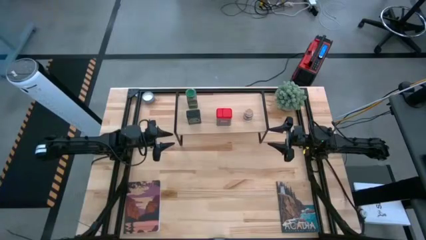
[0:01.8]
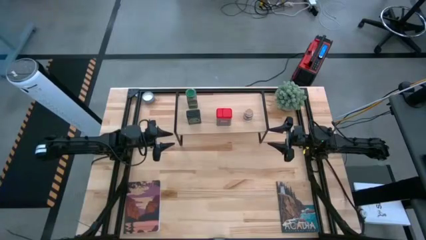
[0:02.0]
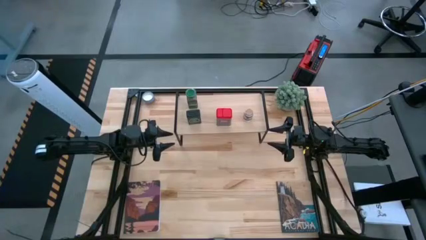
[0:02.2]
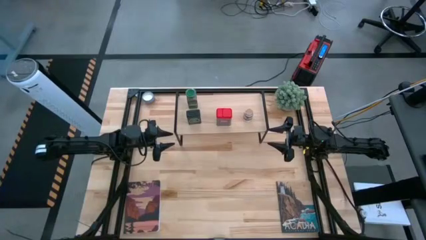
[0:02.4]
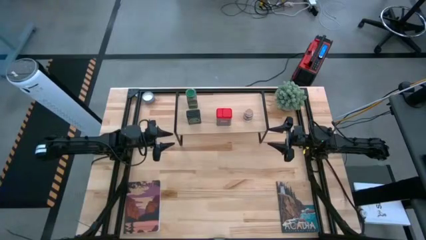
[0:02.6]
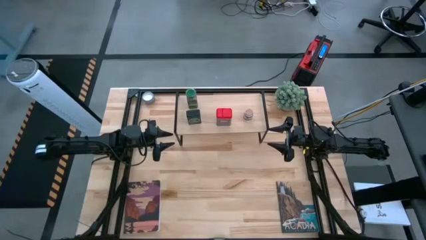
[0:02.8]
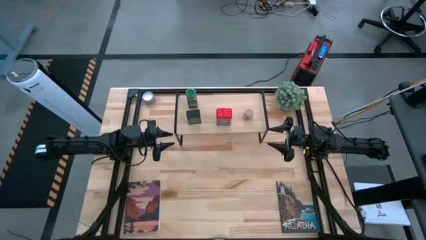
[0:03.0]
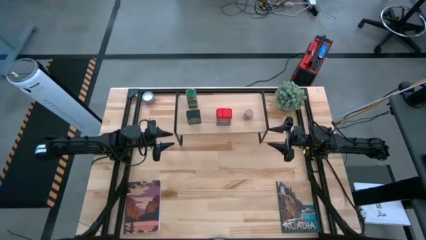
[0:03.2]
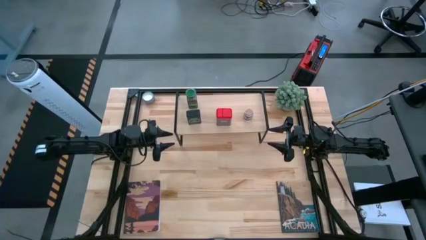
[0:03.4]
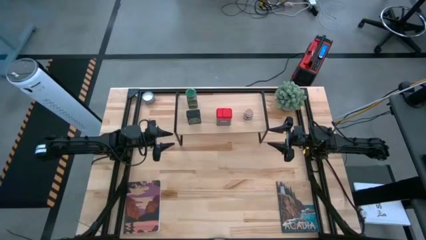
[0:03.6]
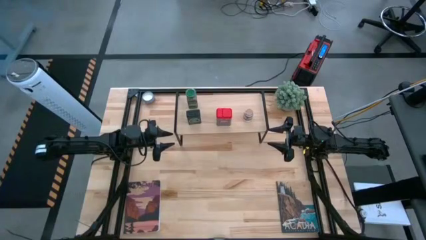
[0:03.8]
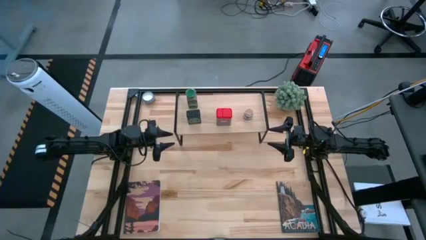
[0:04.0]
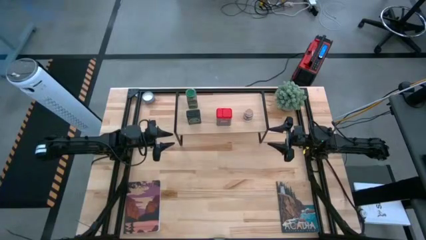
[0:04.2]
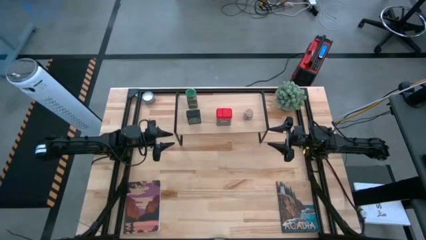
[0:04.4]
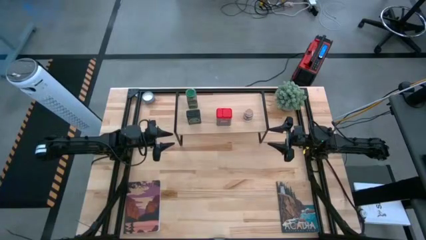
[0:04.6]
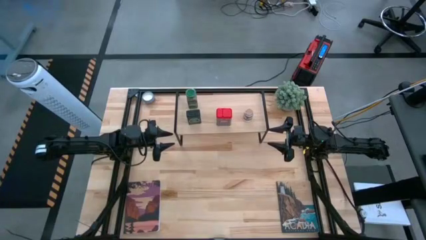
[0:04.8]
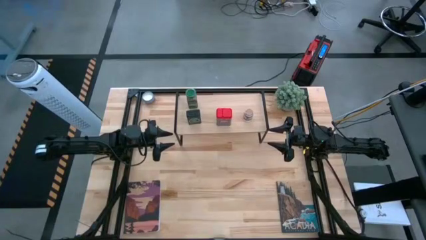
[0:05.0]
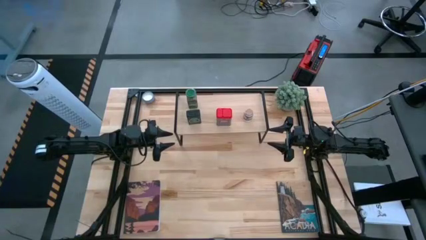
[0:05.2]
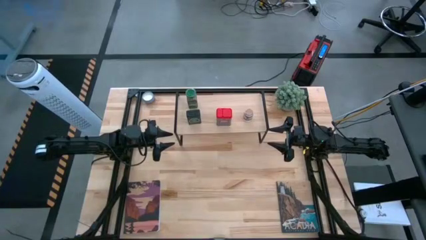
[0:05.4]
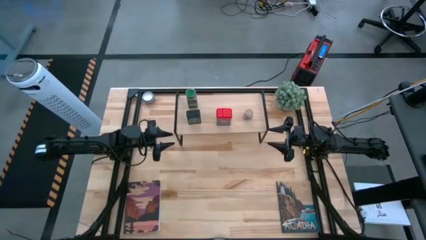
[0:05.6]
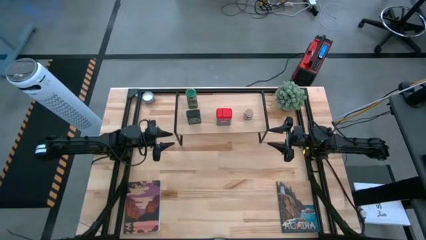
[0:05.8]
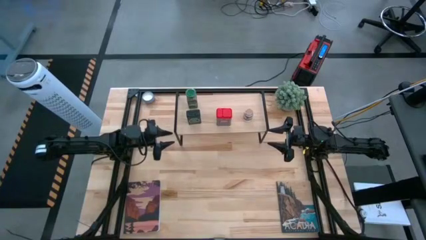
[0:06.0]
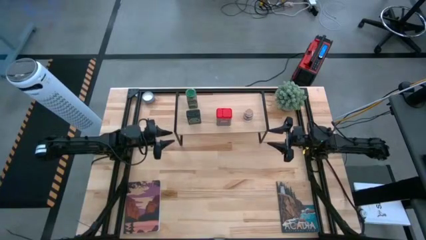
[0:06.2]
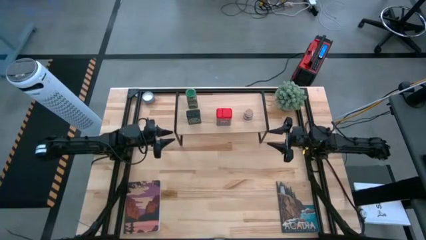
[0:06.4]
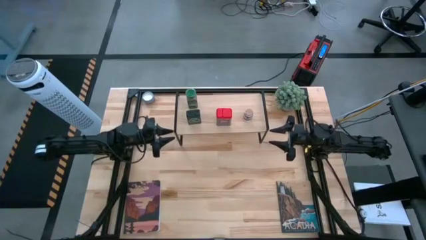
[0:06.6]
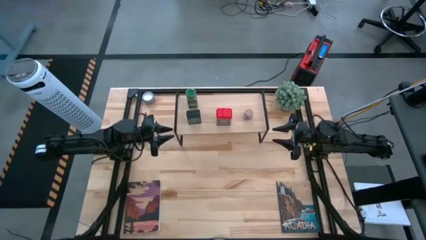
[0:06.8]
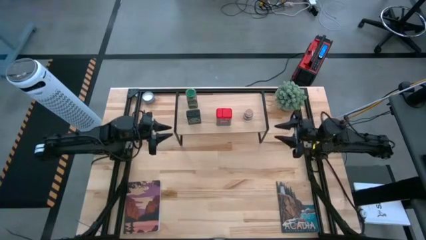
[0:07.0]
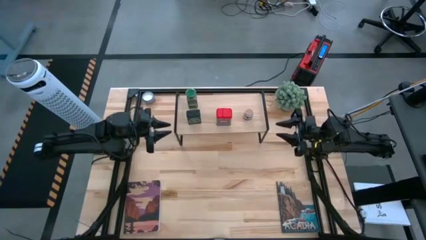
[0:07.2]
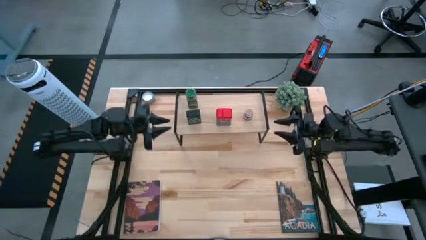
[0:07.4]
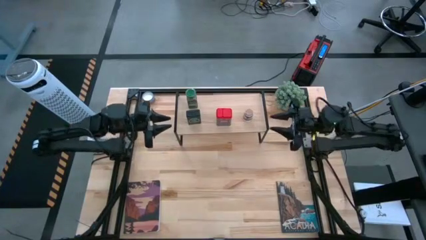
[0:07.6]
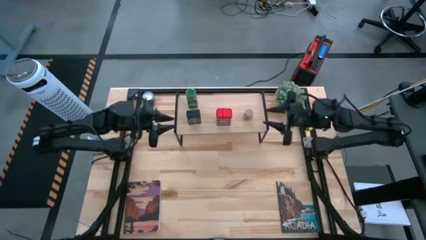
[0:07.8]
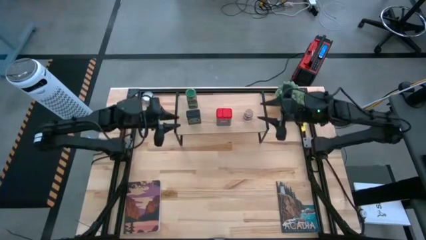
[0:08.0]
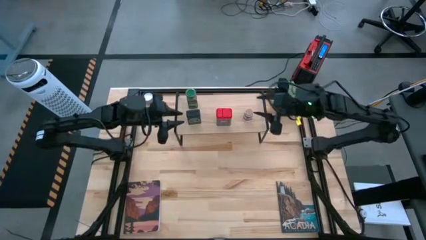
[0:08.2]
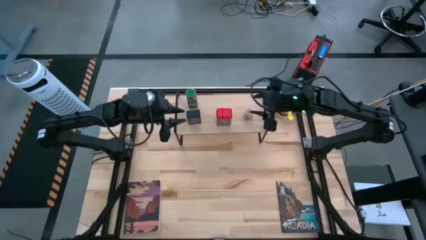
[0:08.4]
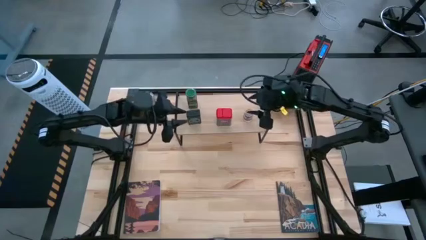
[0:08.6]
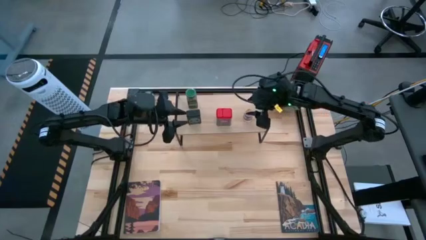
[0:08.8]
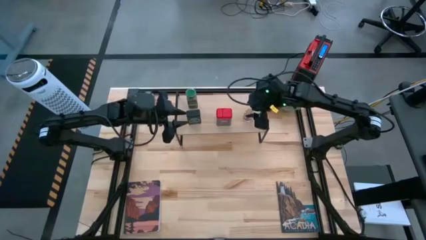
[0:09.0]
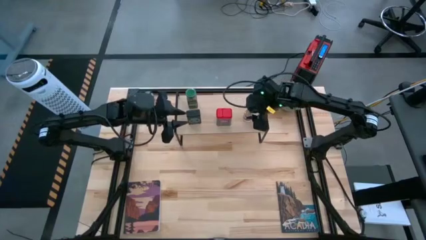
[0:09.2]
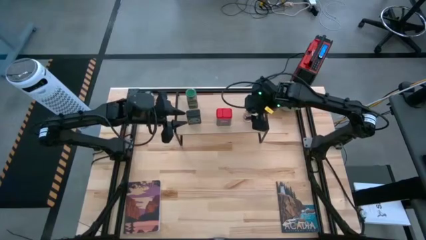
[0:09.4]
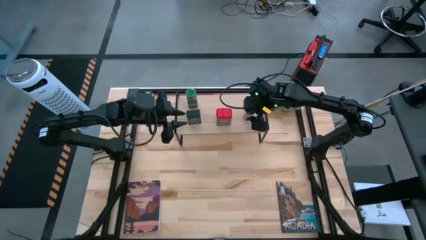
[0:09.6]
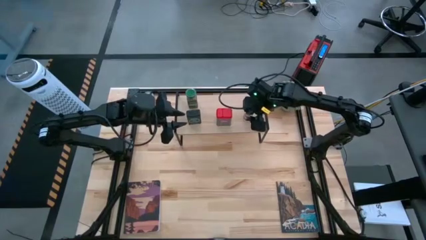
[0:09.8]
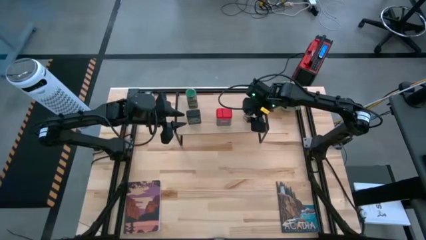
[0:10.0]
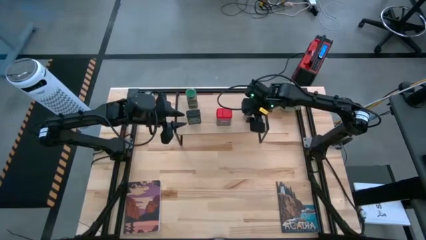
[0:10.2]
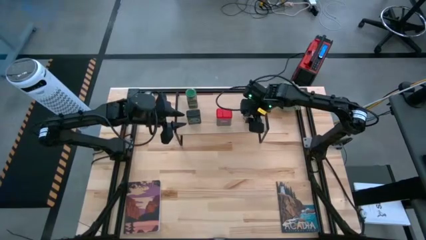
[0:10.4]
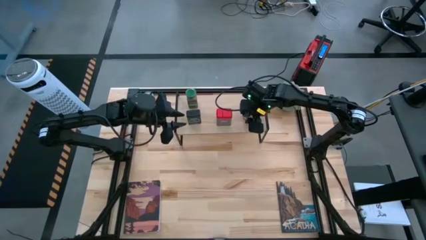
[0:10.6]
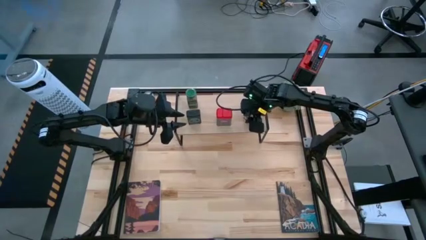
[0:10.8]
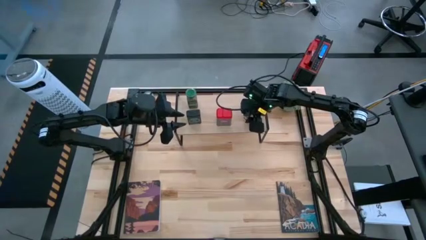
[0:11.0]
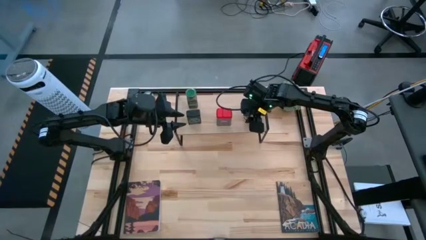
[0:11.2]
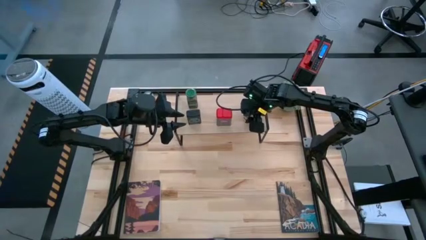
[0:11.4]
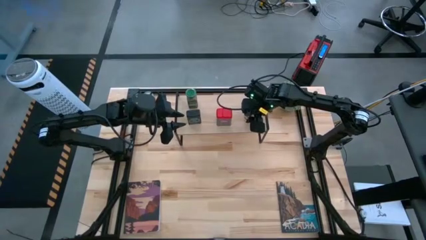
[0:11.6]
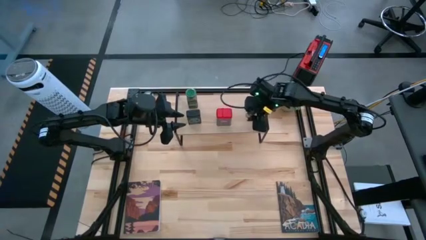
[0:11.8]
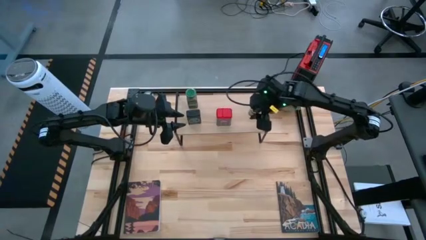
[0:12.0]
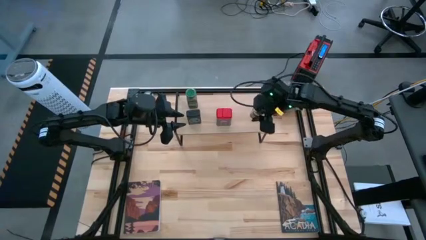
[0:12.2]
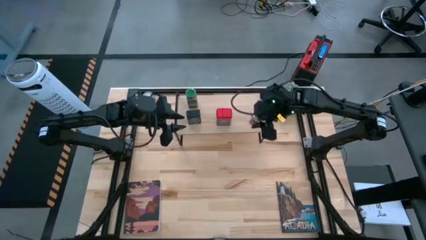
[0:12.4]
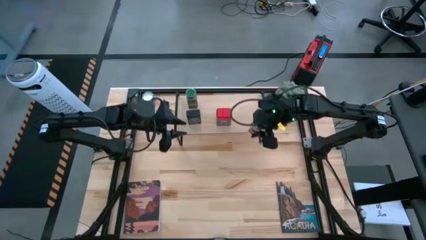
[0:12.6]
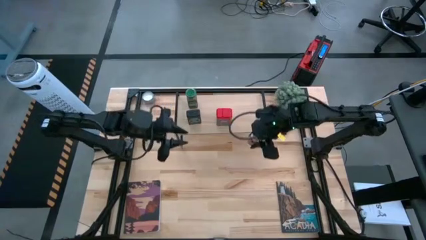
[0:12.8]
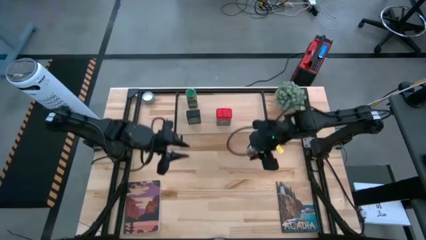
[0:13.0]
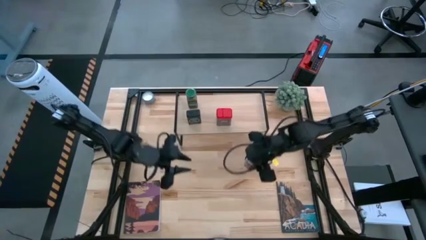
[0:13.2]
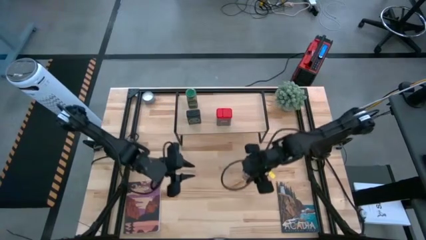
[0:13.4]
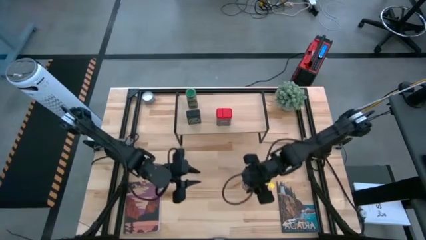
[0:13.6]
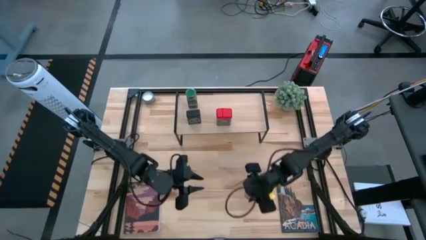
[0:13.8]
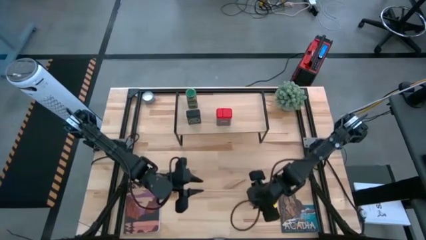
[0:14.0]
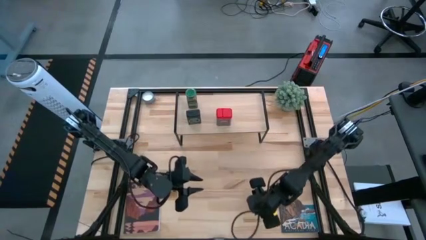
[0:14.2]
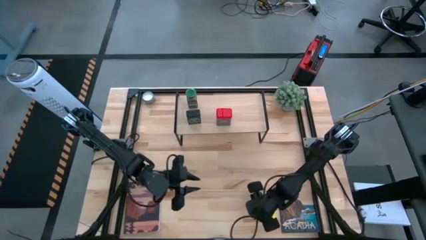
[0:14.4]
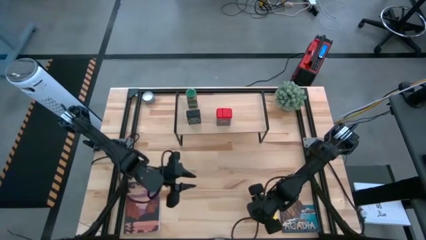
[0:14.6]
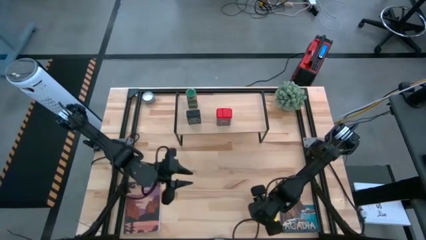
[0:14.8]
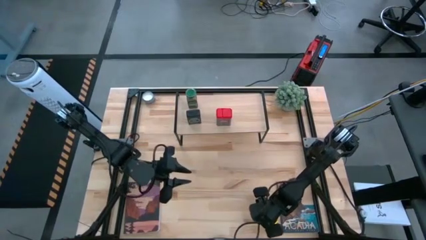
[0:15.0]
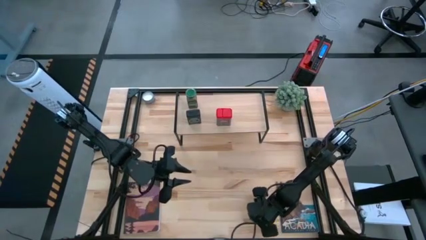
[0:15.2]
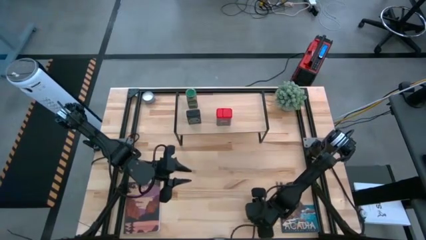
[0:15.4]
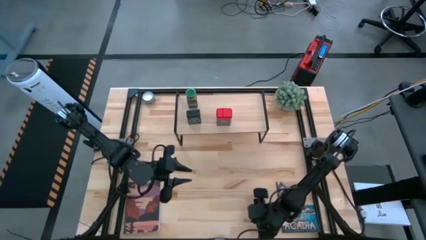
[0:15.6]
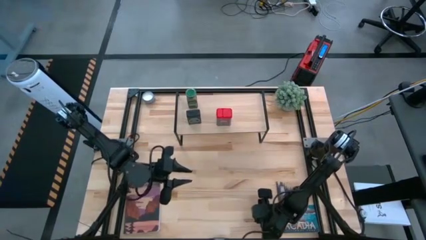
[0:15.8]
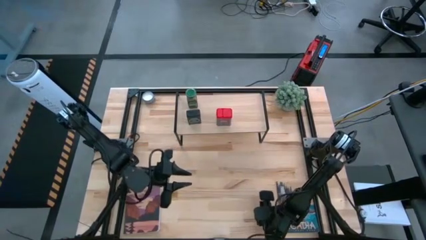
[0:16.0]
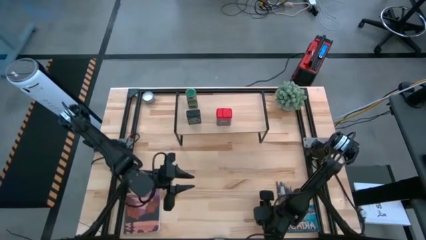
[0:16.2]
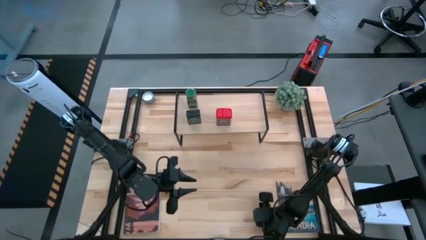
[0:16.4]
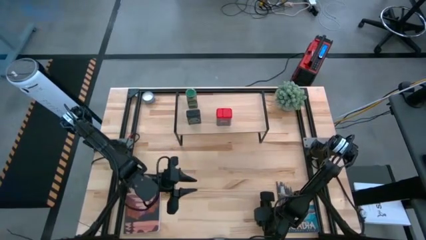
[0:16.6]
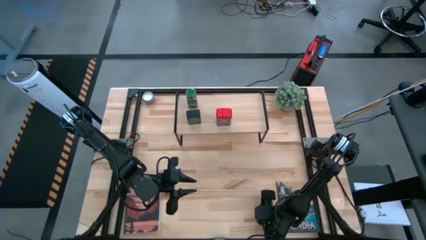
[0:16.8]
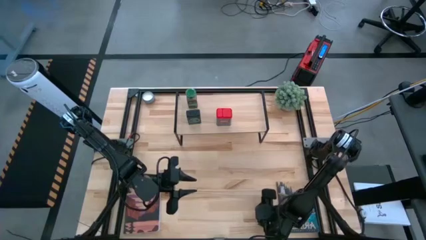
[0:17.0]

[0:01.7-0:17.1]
Task: Shelf spices
Remove the transparent seasoning bottle from the shelf
